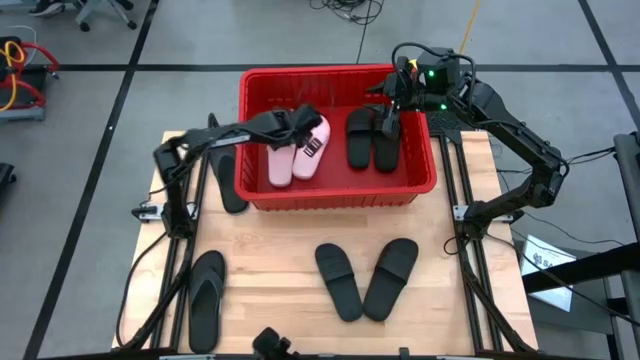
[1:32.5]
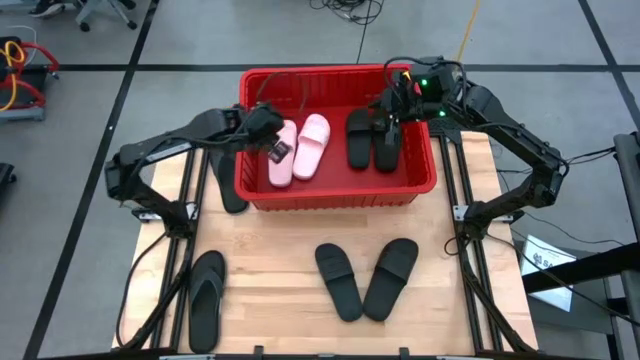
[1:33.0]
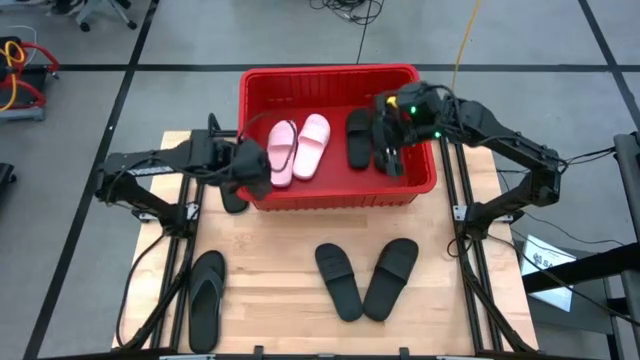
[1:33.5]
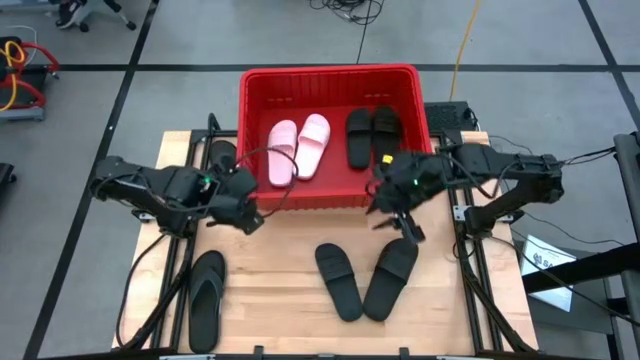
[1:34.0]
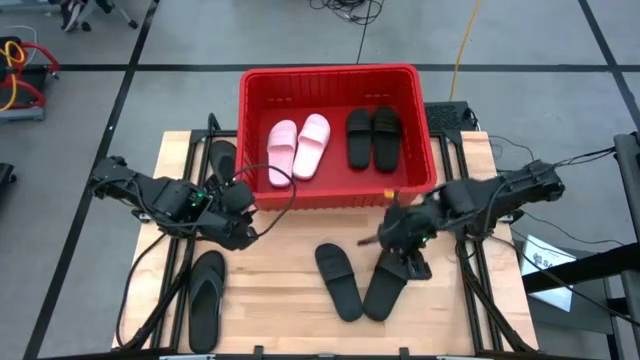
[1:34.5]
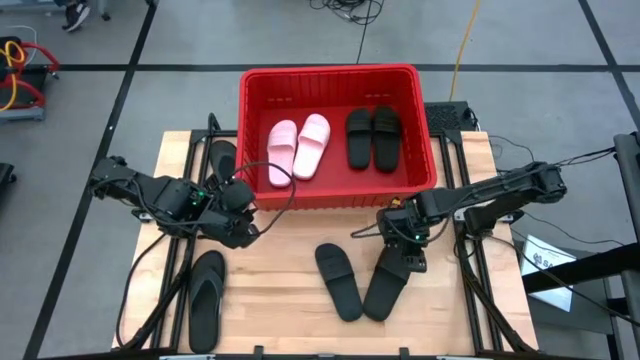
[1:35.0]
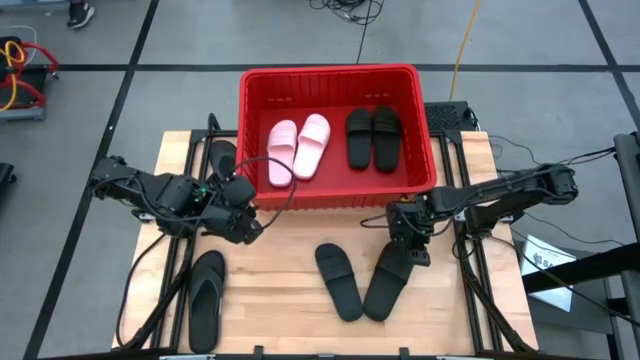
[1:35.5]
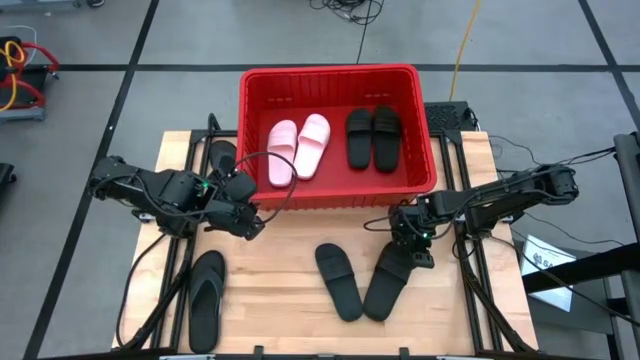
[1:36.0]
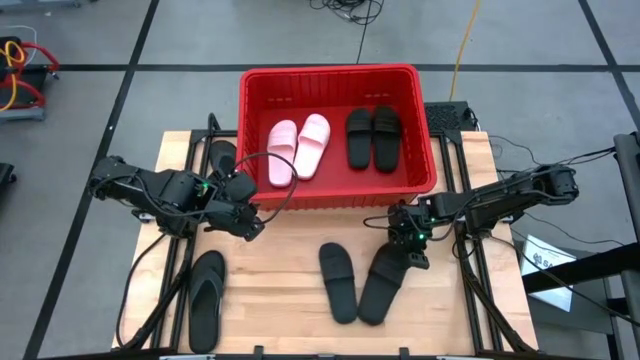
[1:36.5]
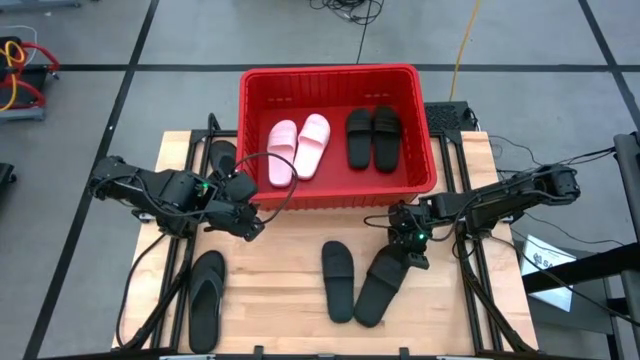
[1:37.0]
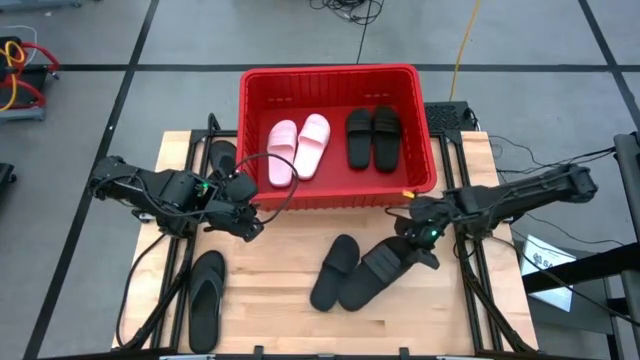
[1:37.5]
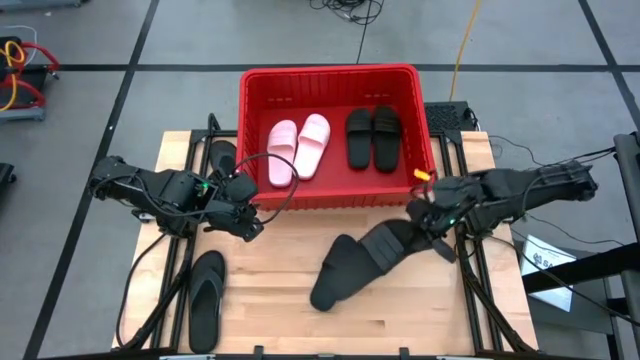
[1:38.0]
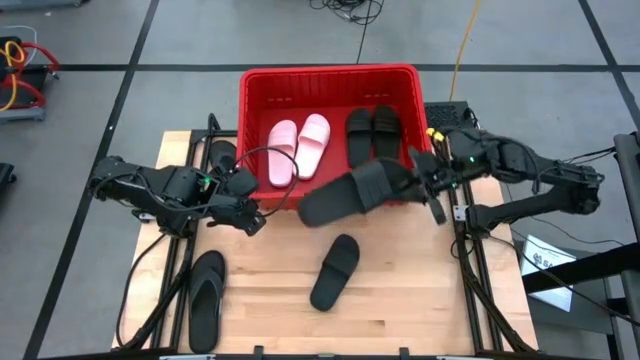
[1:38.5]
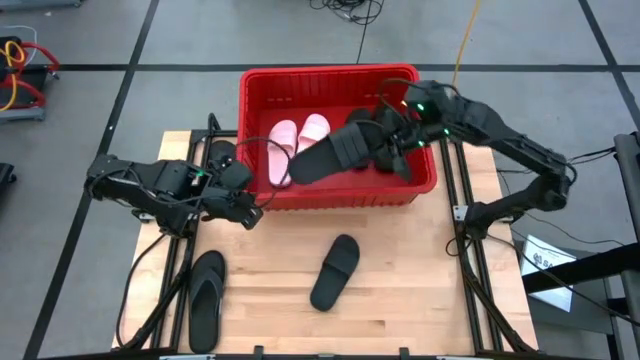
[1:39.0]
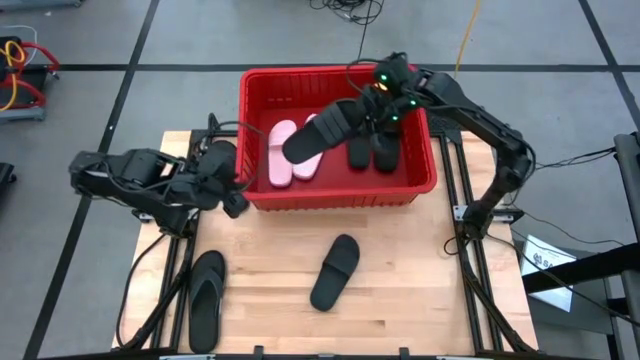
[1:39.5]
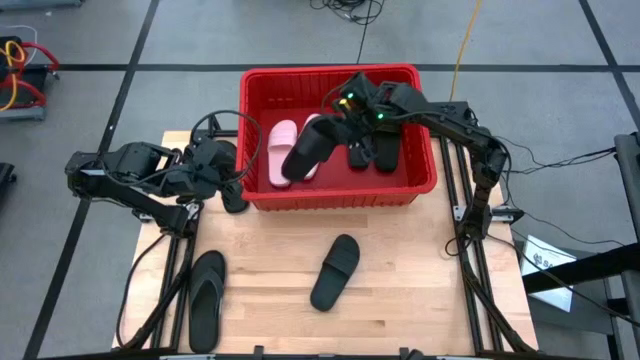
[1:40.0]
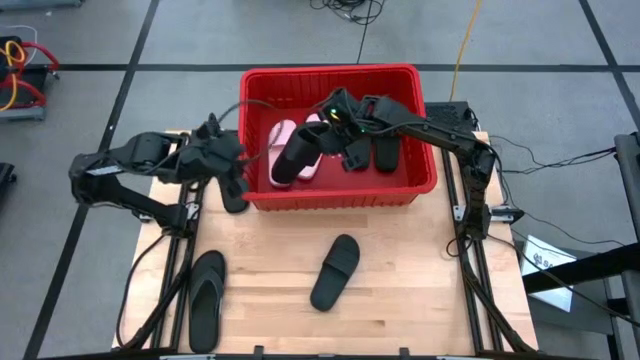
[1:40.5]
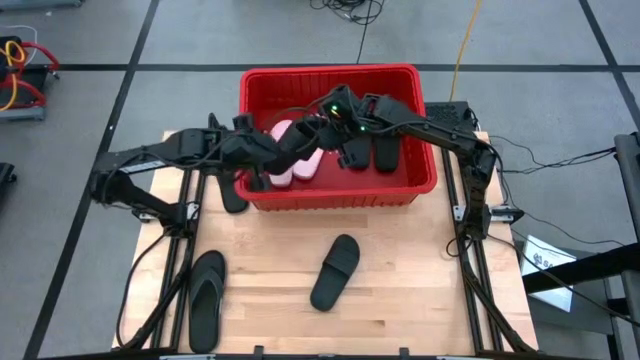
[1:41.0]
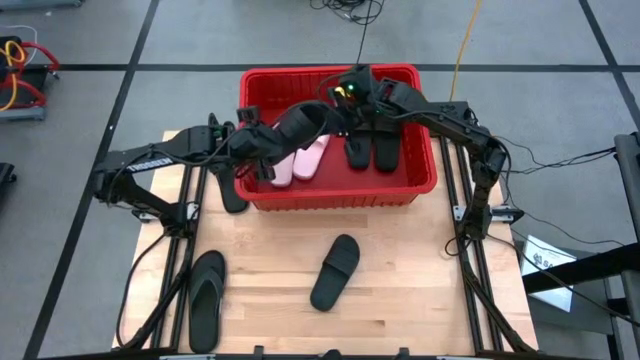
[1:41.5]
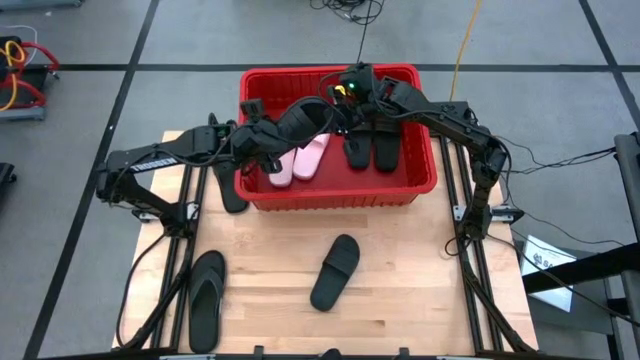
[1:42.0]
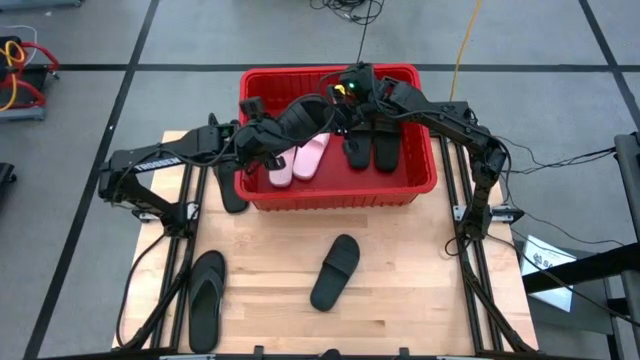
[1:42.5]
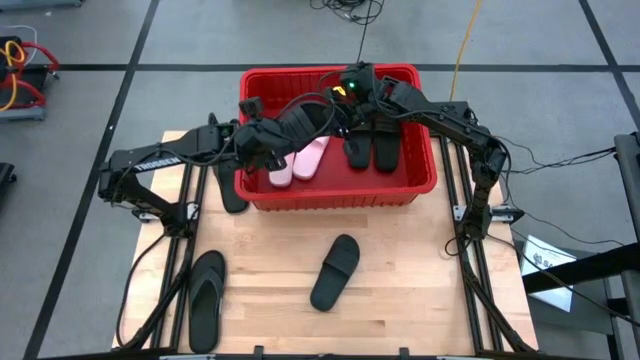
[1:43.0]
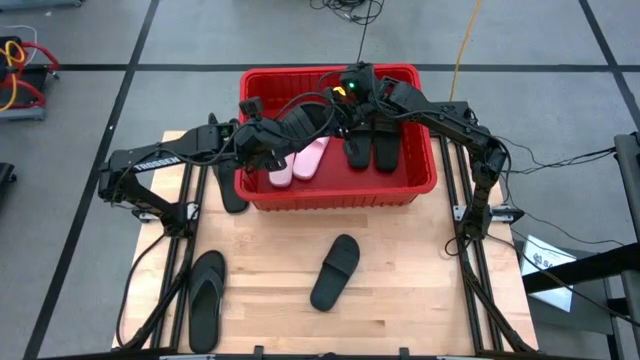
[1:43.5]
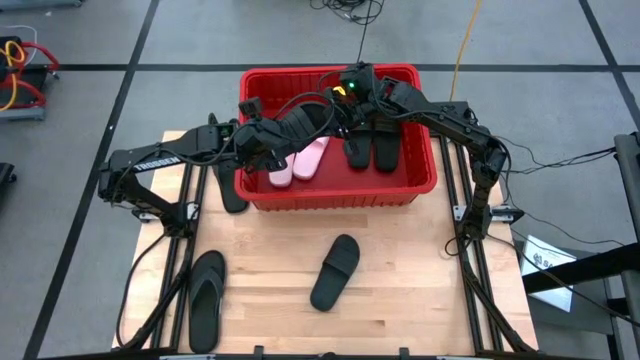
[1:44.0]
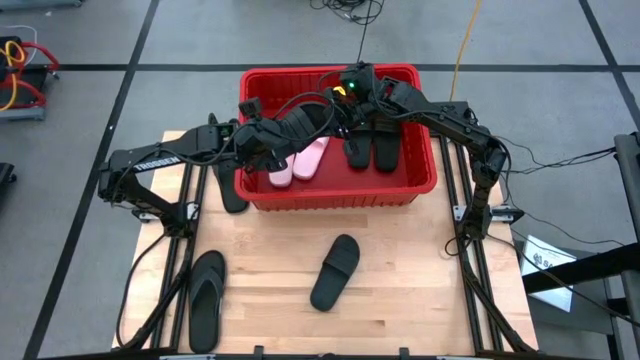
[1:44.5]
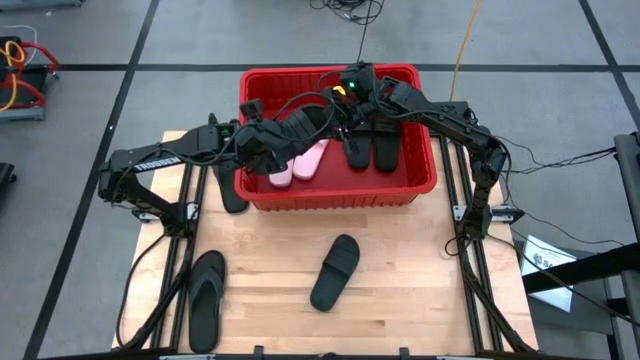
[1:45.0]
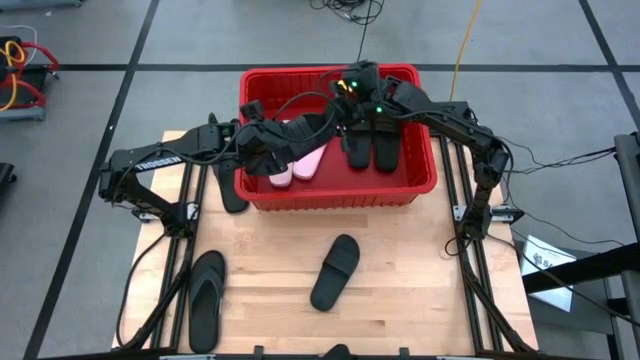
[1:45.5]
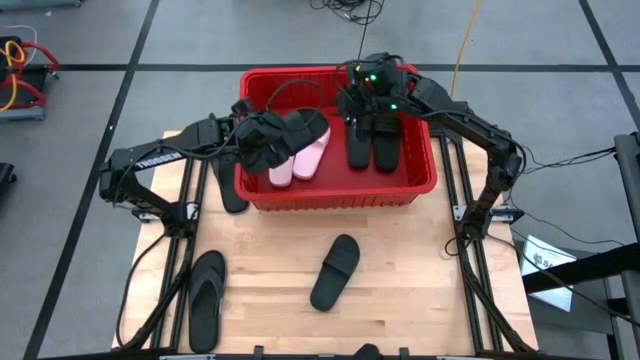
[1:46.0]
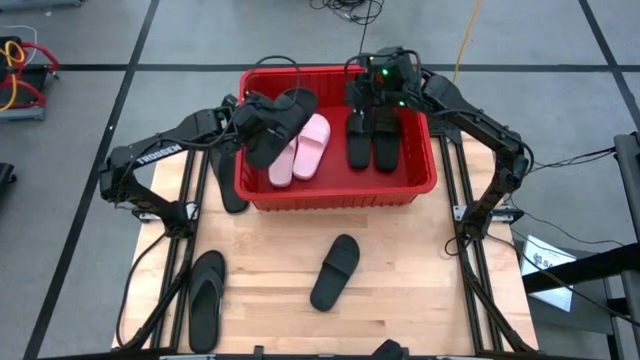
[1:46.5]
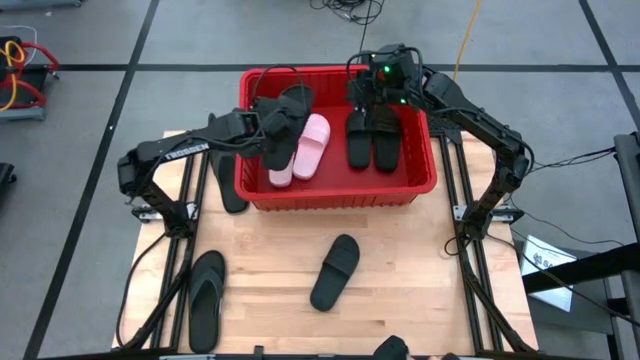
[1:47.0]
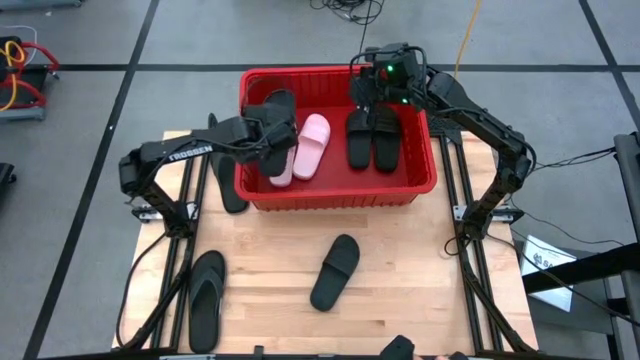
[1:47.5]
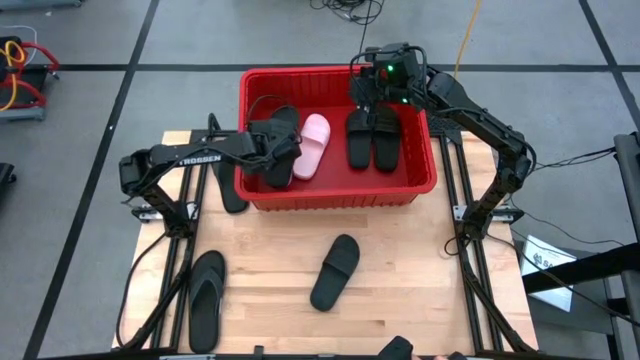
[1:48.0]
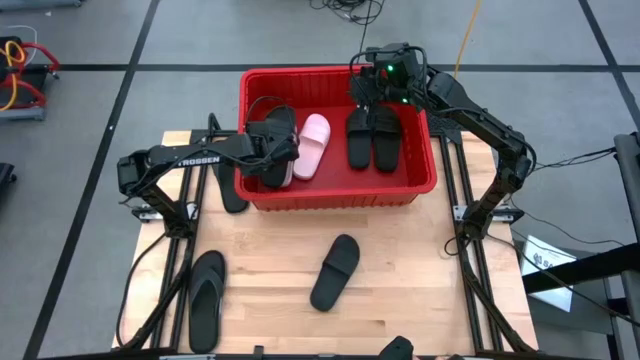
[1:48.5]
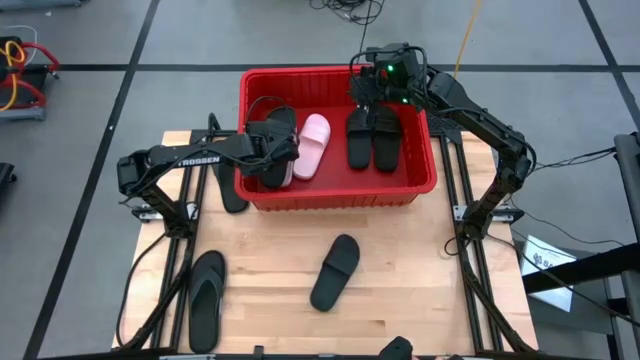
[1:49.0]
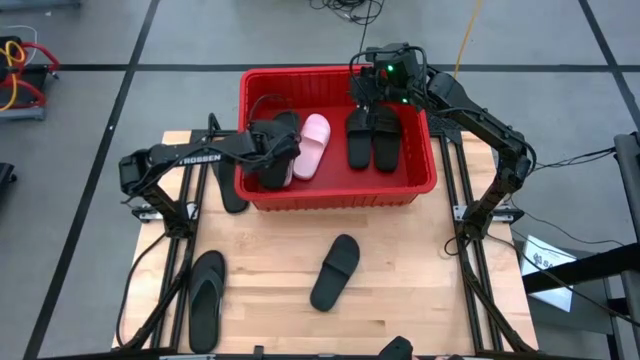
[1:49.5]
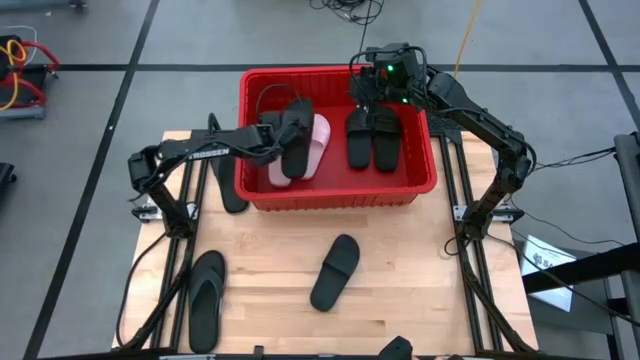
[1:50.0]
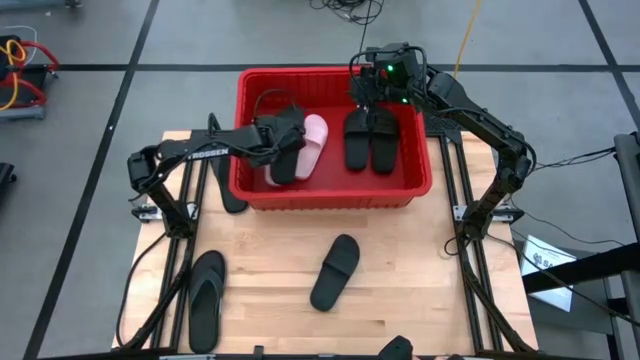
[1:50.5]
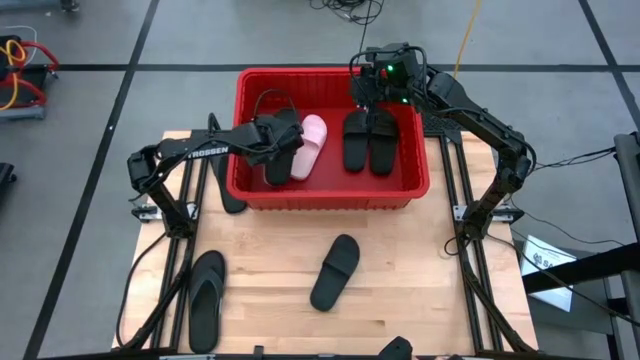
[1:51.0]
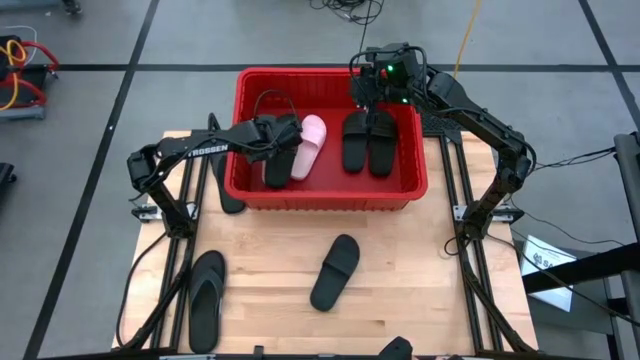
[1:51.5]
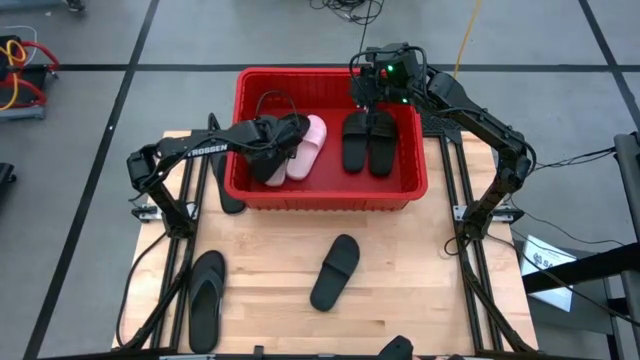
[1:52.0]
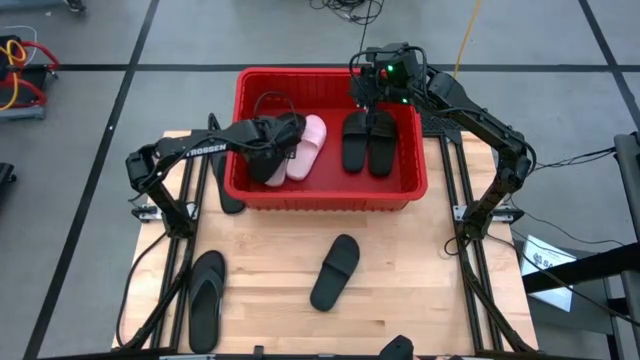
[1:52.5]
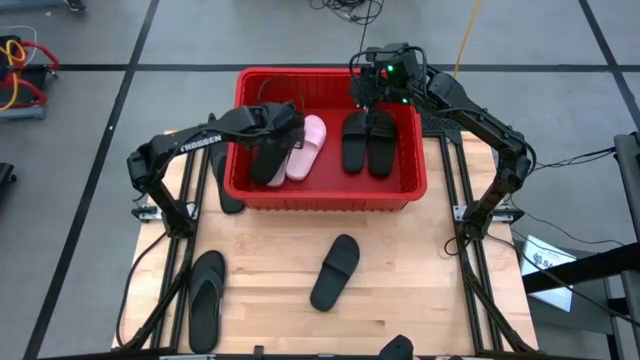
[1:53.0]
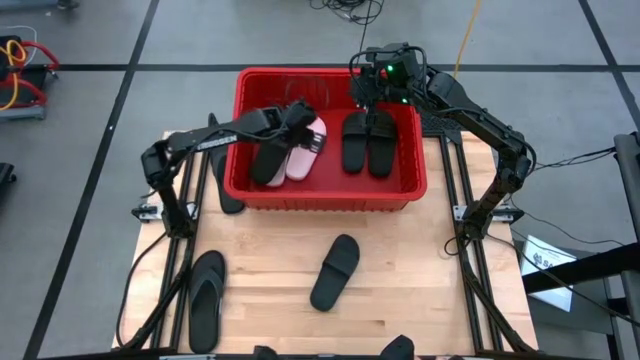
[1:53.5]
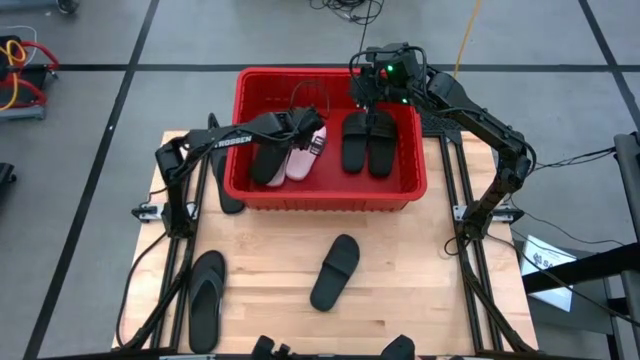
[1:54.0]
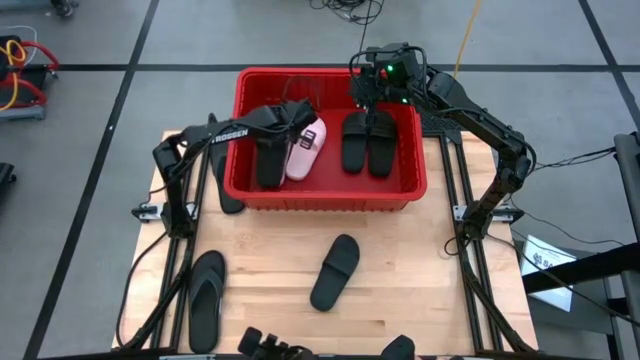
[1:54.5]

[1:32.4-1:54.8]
Task: Pick and place slides into bin
Put the black slide on top of the pink slide in the red bin
